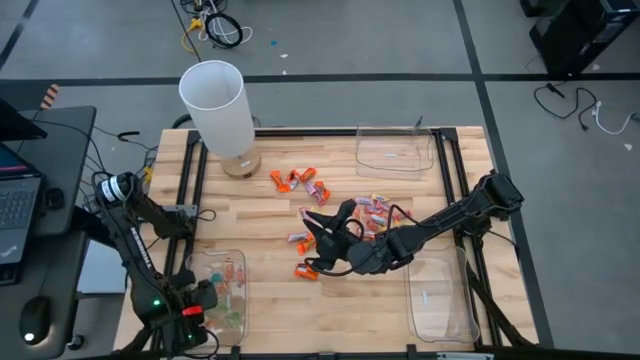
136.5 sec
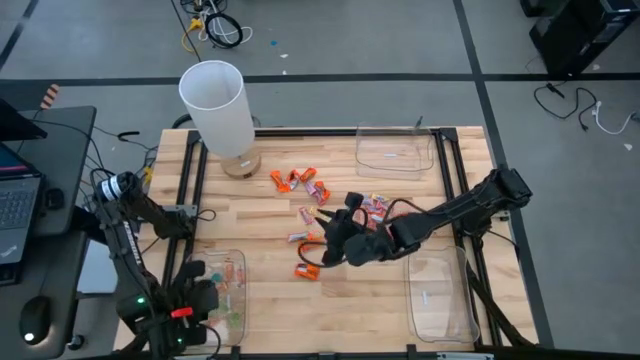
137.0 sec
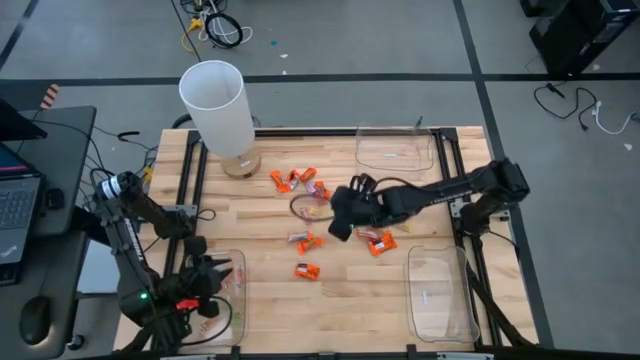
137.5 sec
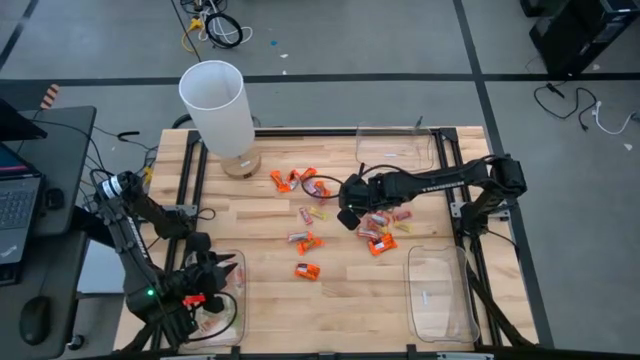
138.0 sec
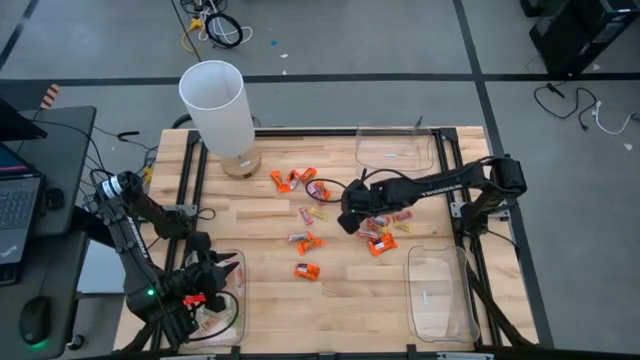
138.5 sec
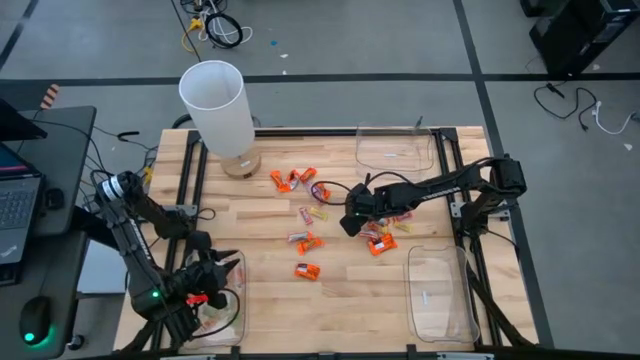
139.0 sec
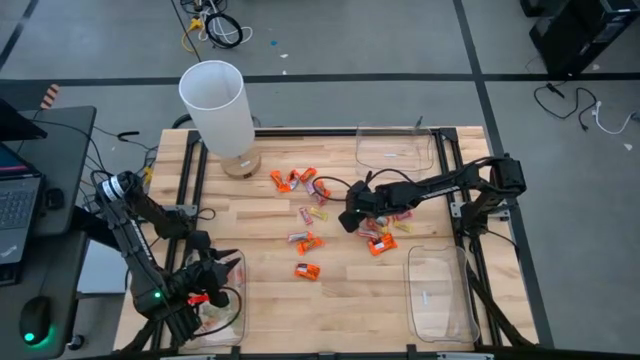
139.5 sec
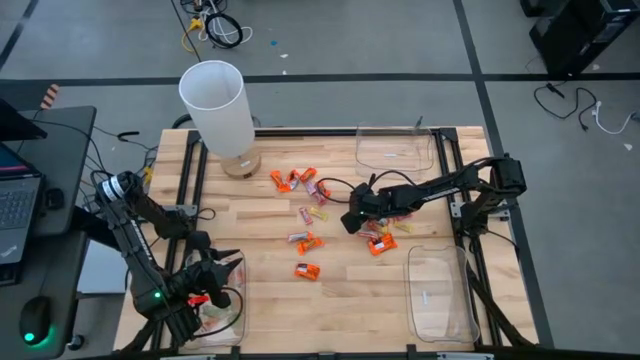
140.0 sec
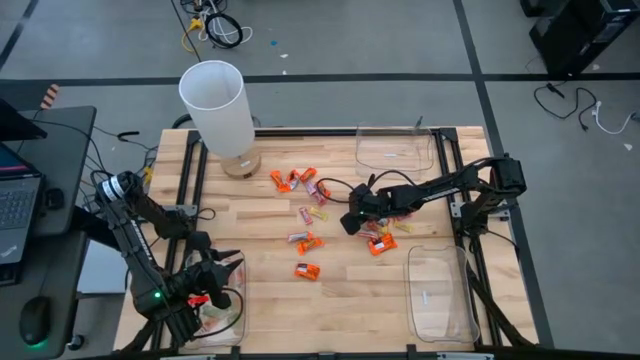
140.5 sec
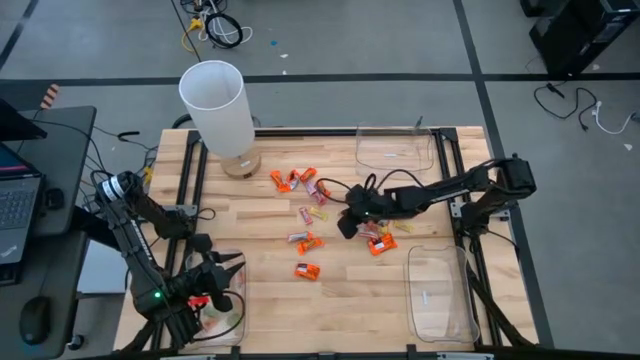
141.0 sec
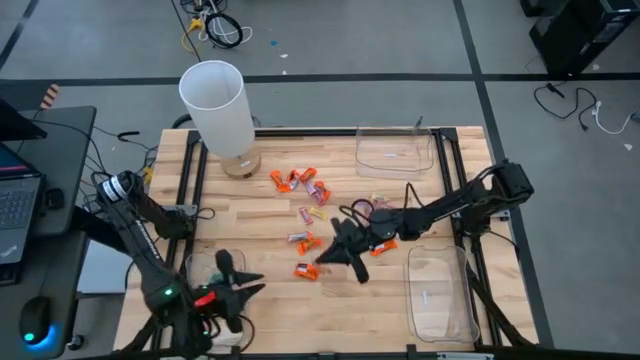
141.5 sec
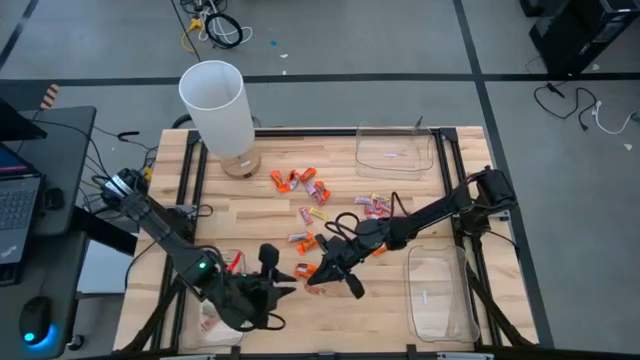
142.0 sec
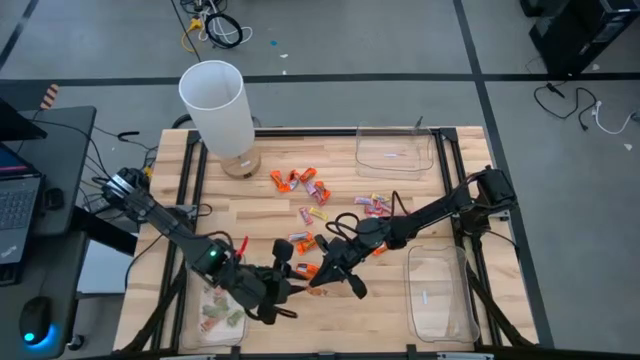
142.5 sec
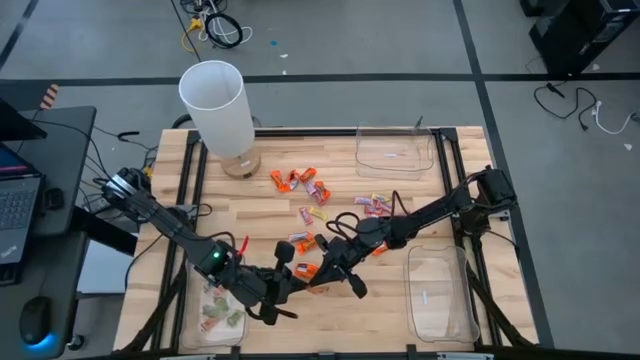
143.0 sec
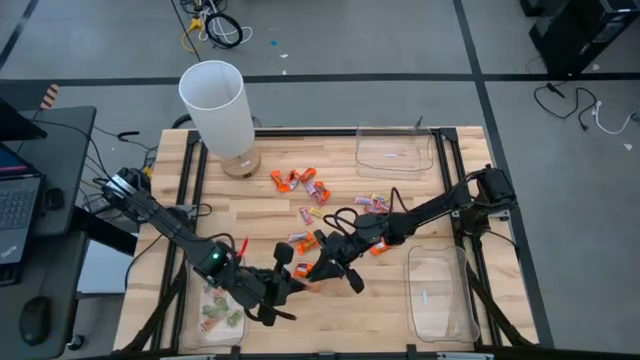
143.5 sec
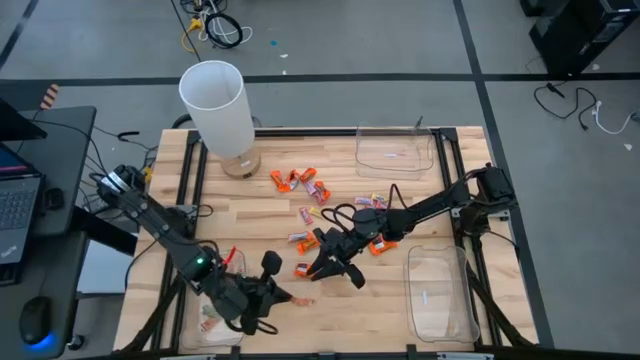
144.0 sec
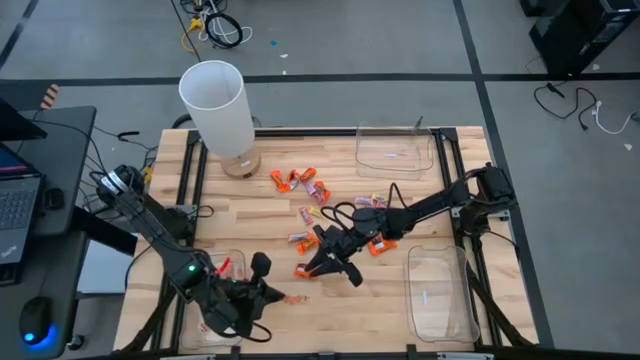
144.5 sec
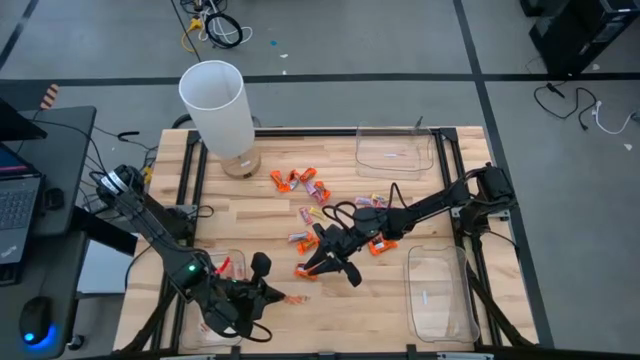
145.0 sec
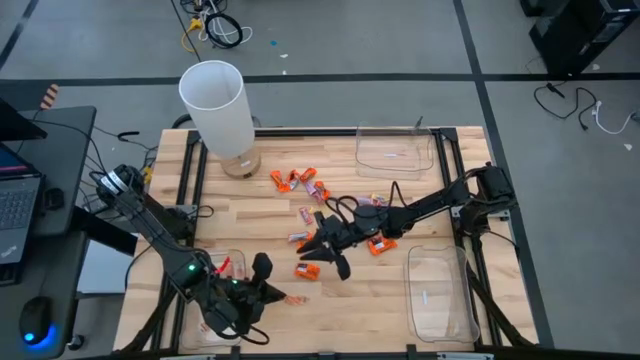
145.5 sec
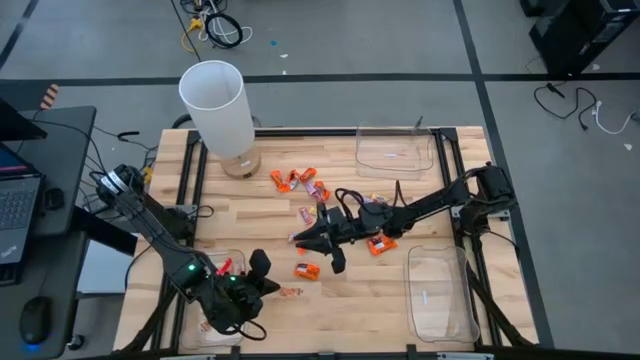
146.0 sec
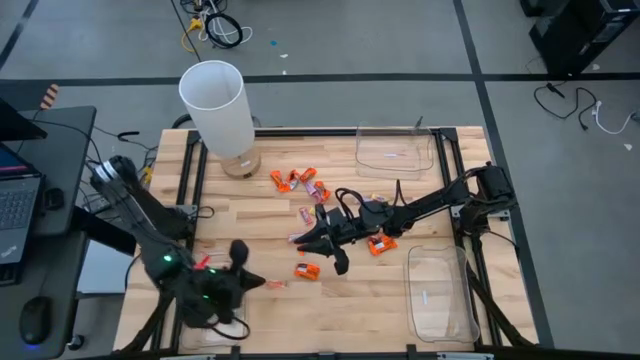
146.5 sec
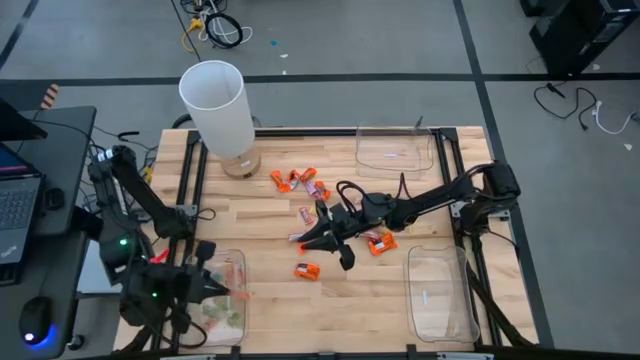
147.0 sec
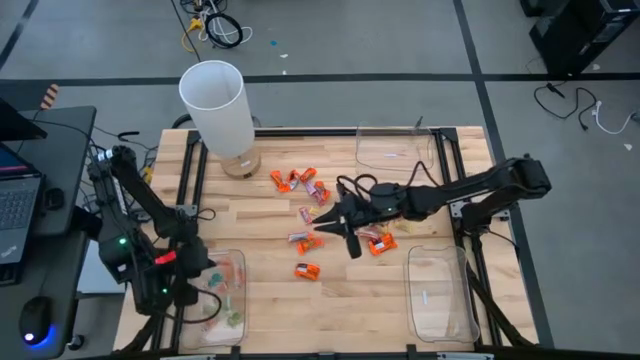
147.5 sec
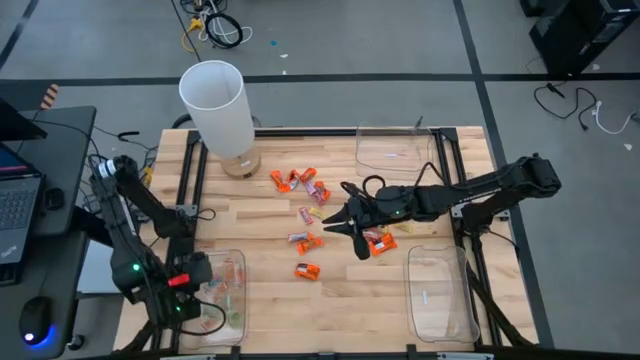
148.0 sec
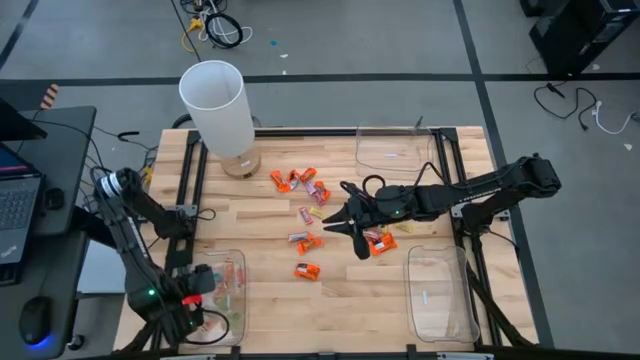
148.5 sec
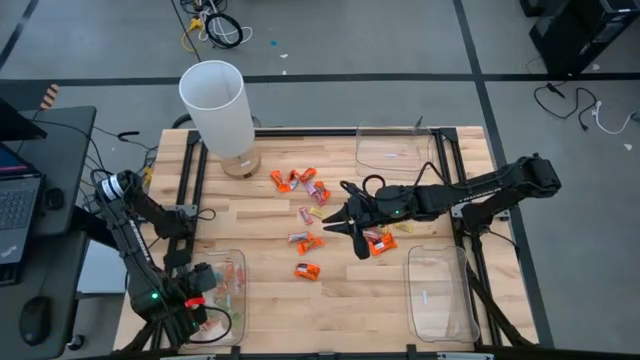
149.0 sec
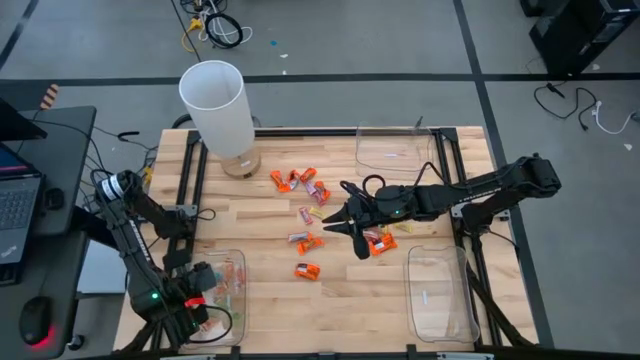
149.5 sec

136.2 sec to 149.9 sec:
Task: Sort candy
Put the orange gummy into the bottom left transparent bin

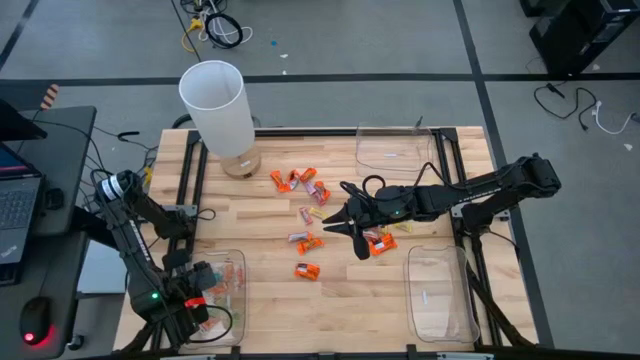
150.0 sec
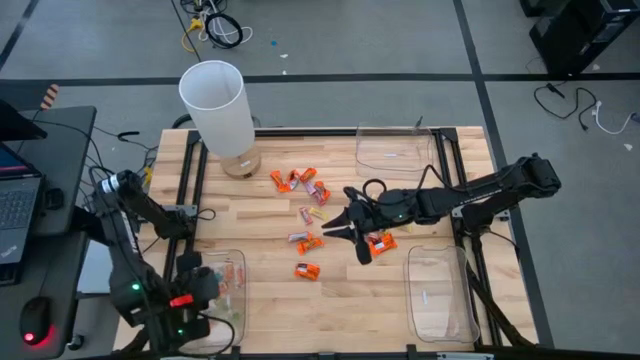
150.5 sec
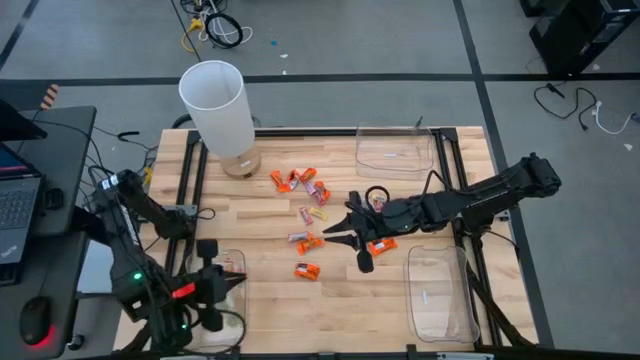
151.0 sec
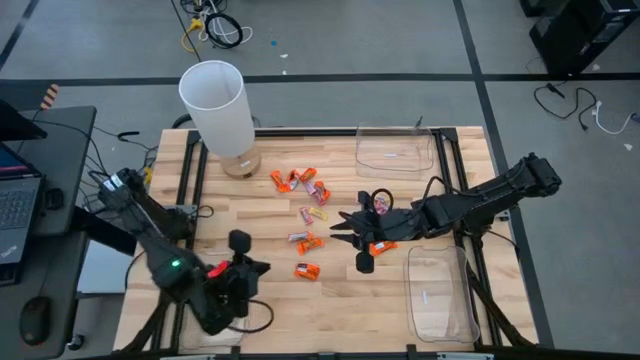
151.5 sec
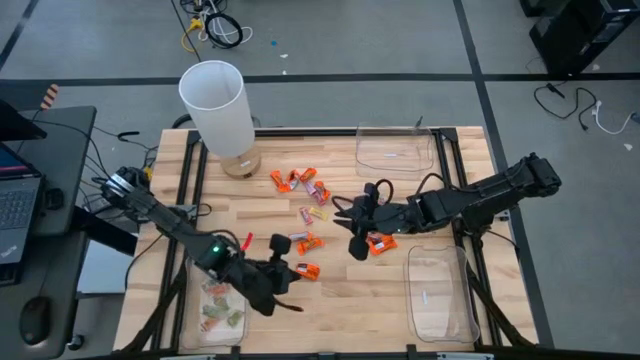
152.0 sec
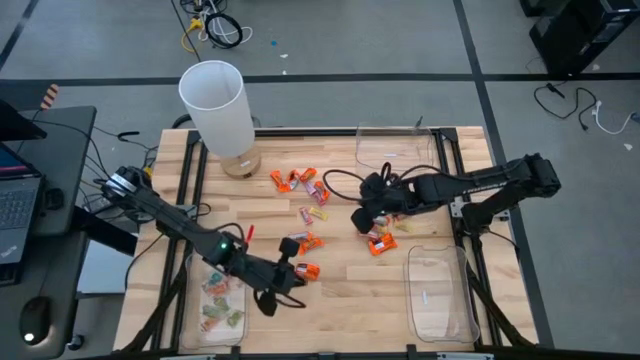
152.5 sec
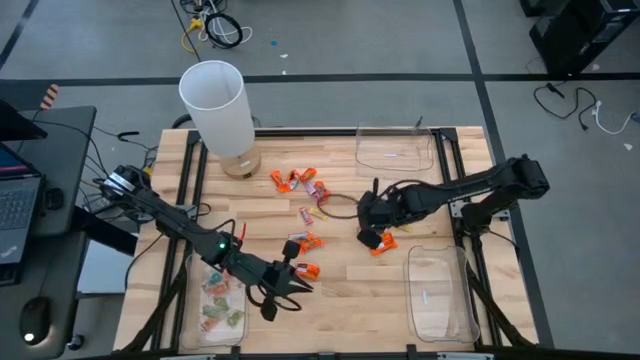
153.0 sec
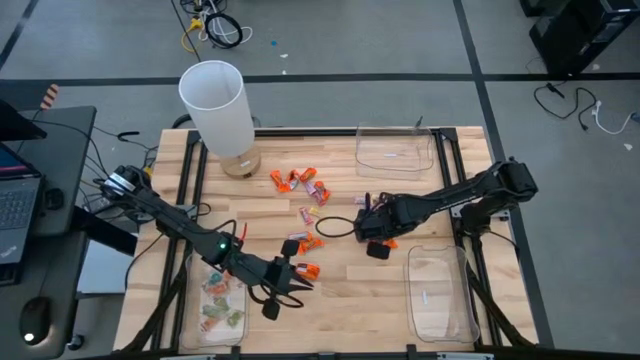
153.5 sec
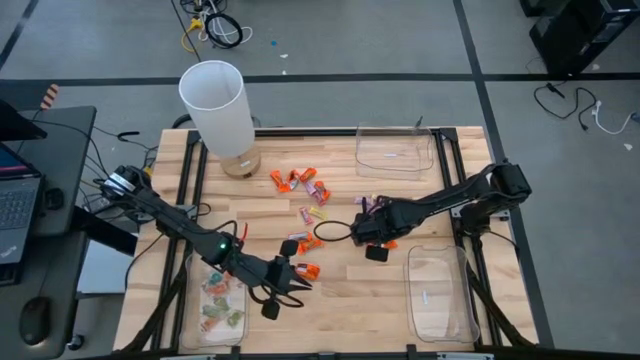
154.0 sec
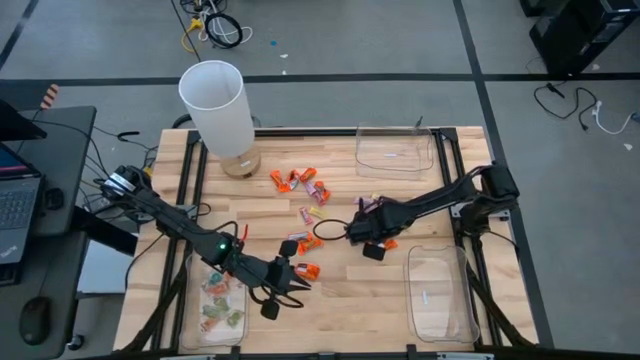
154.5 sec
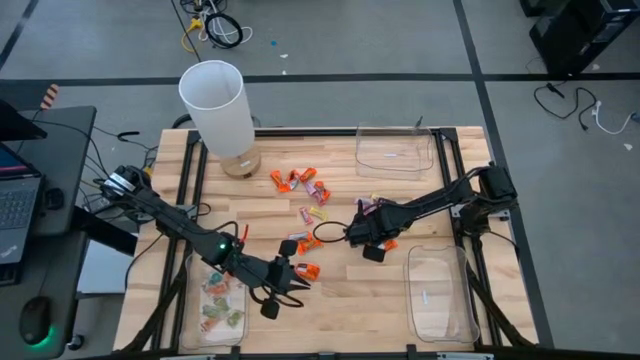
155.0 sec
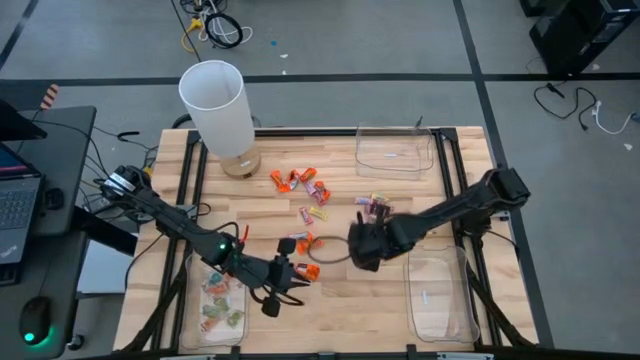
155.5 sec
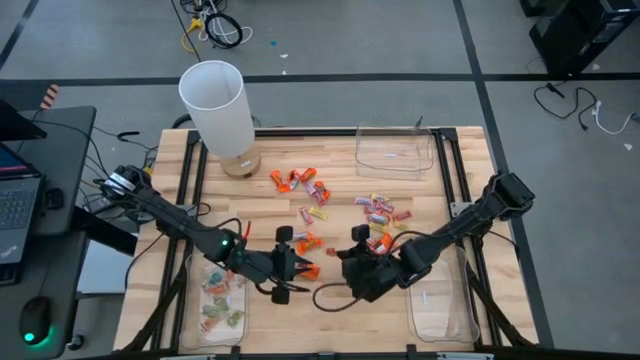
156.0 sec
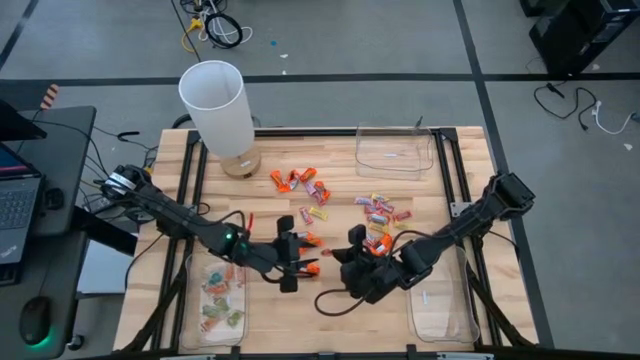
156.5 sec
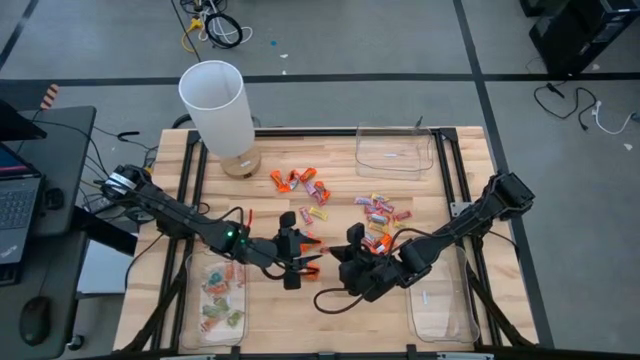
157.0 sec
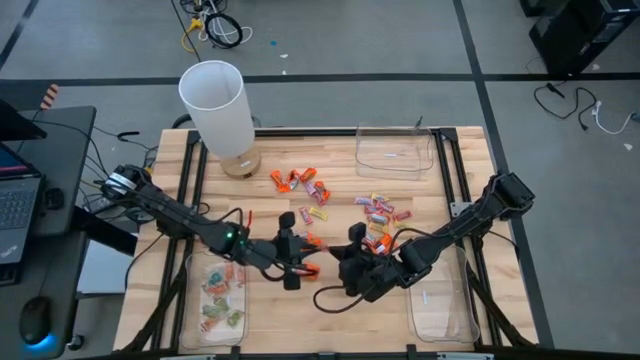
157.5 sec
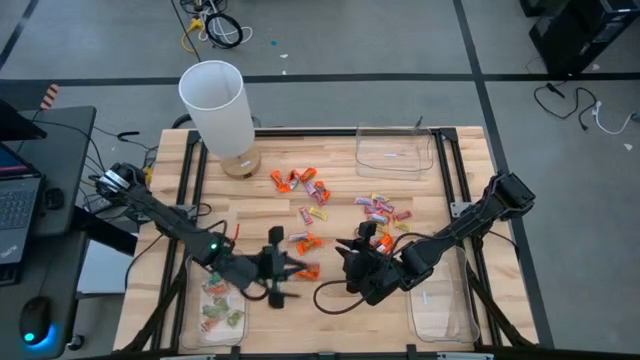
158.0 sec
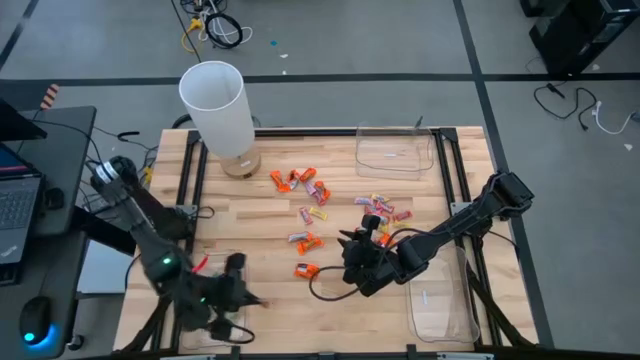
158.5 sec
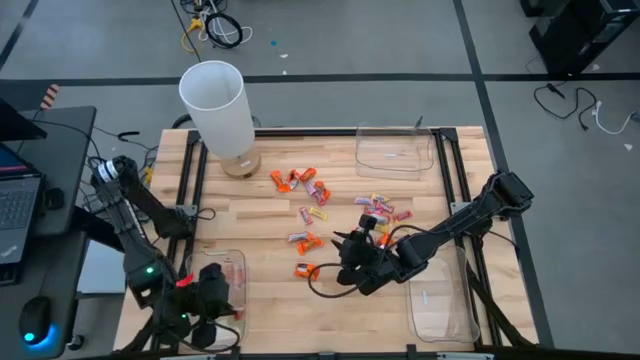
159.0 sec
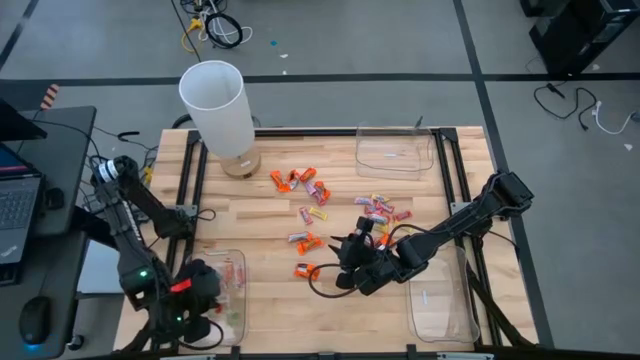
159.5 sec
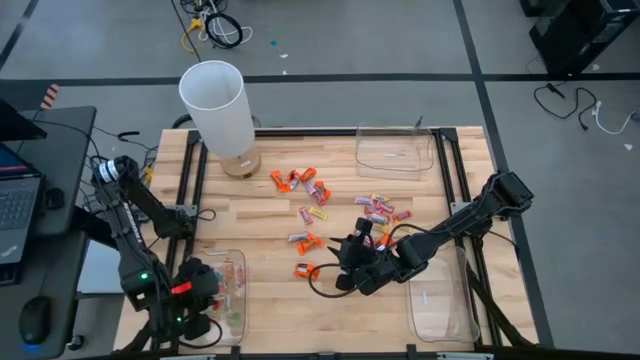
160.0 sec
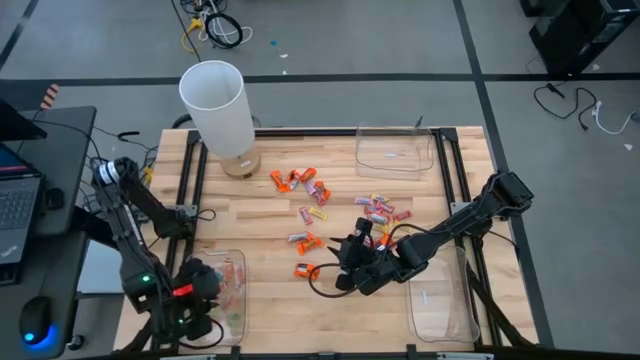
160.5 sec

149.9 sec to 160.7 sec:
Put the red gummy into the bottom left transparent bin
